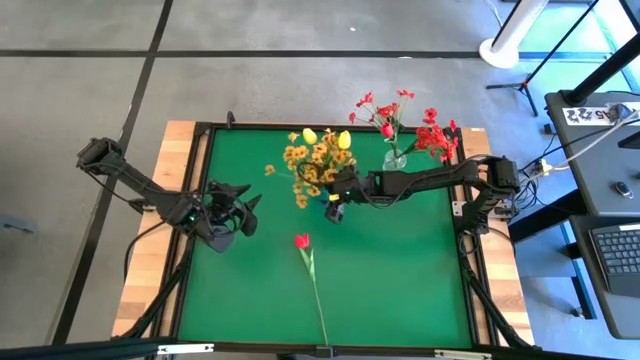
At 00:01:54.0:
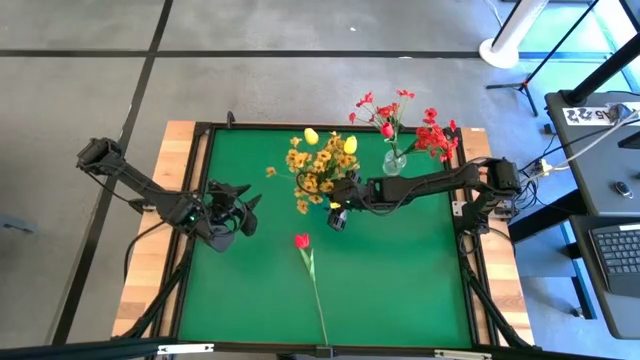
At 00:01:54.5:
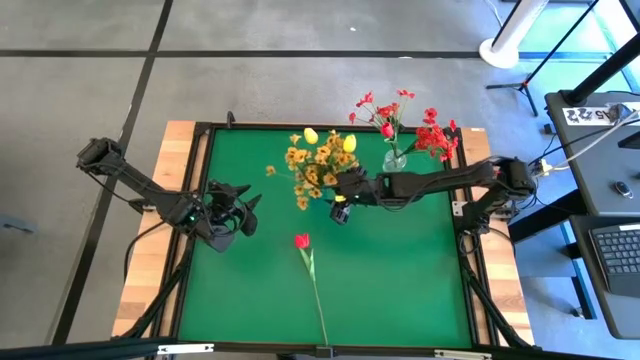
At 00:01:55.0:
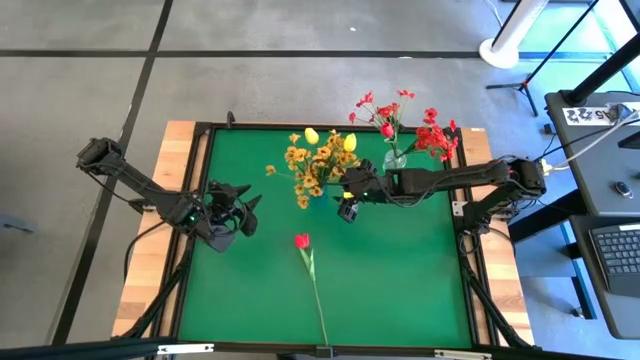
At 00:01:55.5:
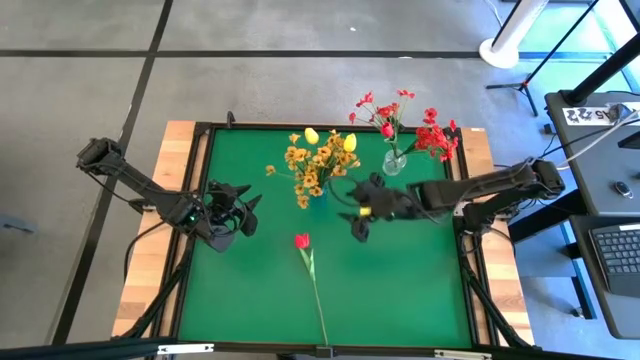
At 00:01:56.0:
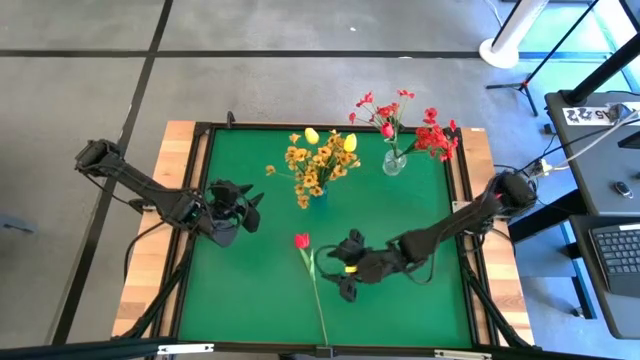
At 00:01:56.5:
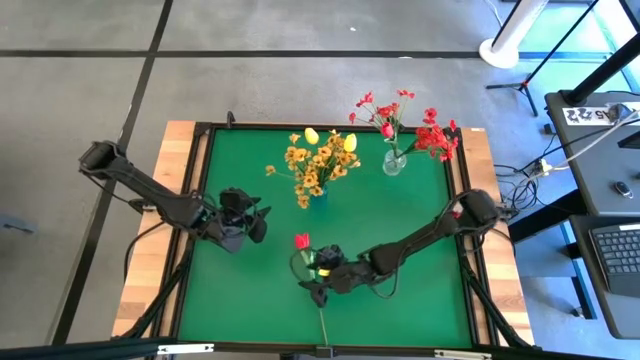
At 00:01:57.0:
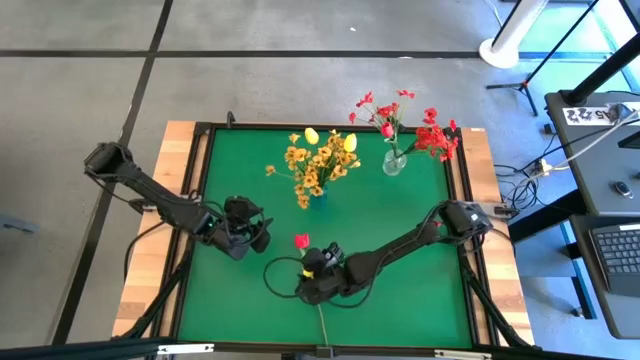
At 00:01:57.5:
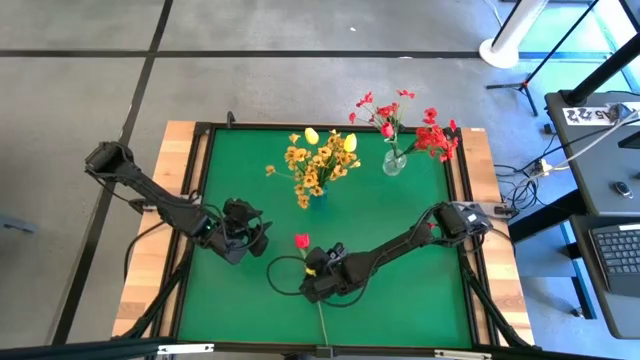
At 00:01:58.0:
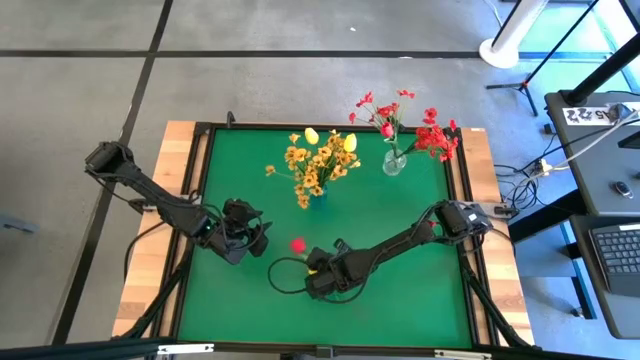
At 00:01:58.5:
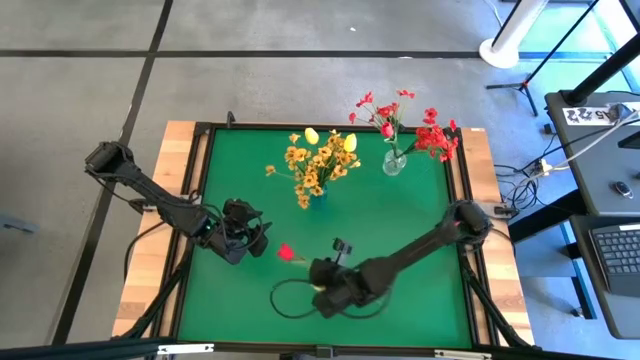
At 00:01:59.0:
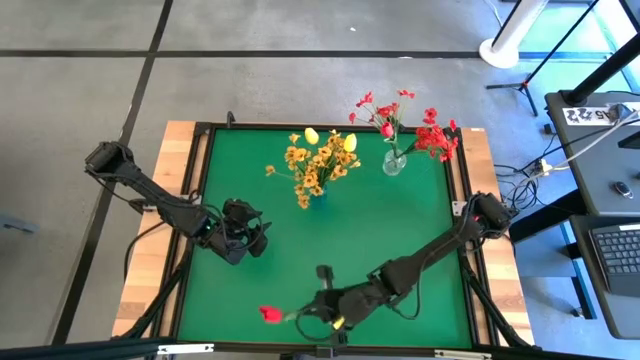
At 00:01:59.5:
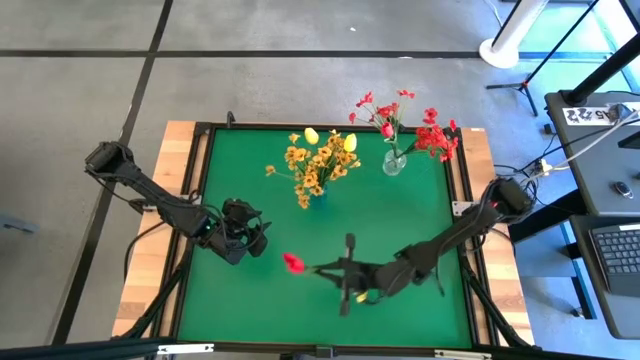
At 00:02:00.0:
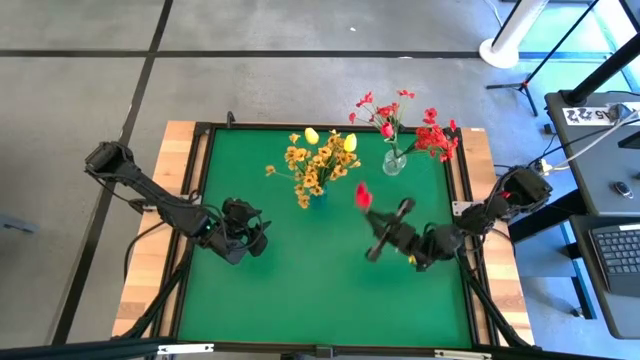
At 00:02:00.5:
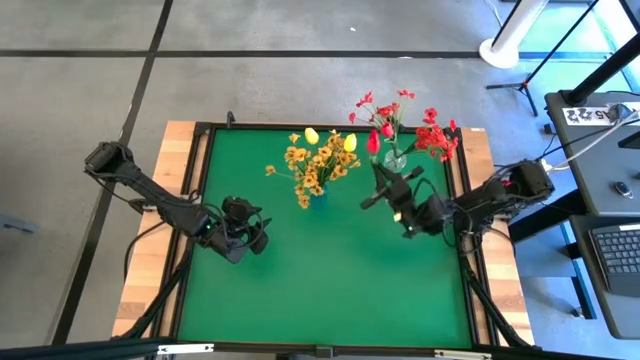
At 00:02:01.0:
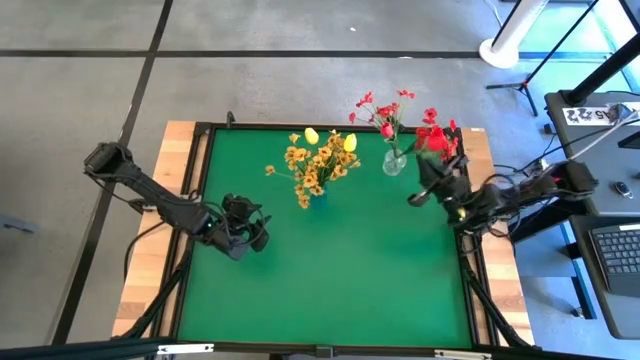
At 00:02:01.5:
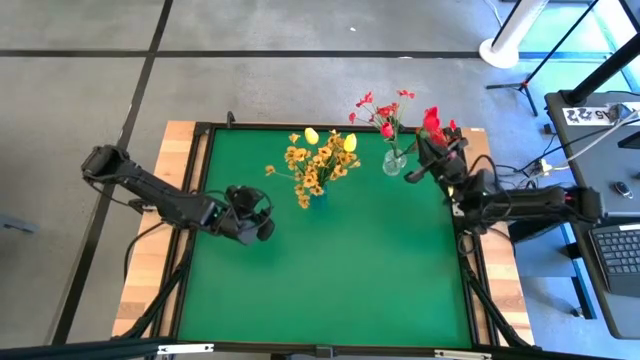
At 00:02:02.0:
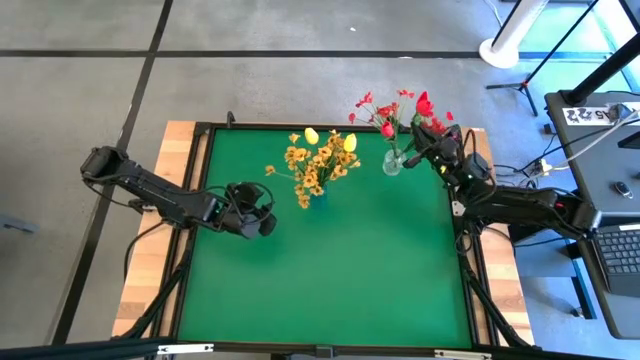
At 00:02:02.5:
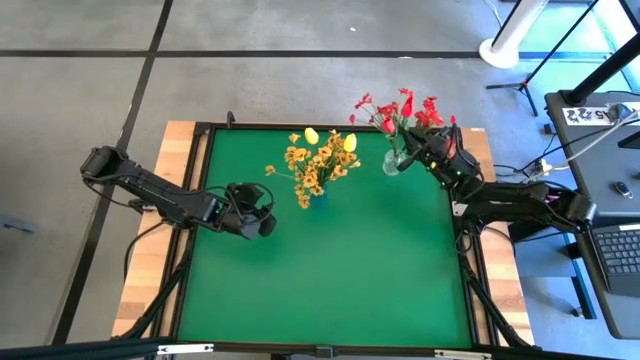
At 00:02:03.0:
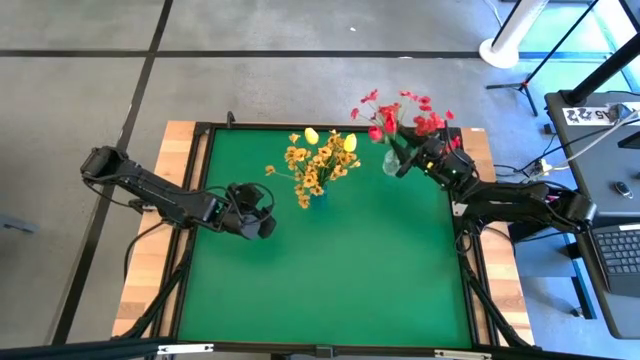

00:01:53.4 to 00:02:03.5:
Task: Sort flowers into vase by color
Put the red flower into the transparent vase

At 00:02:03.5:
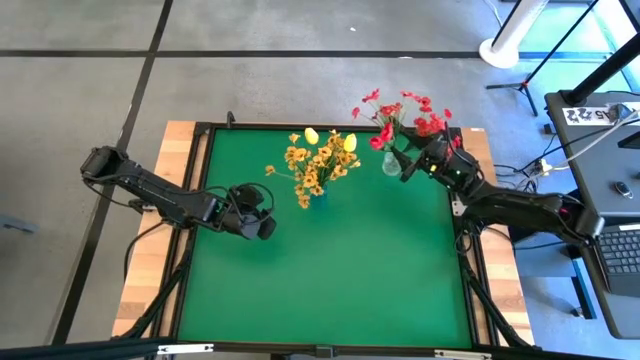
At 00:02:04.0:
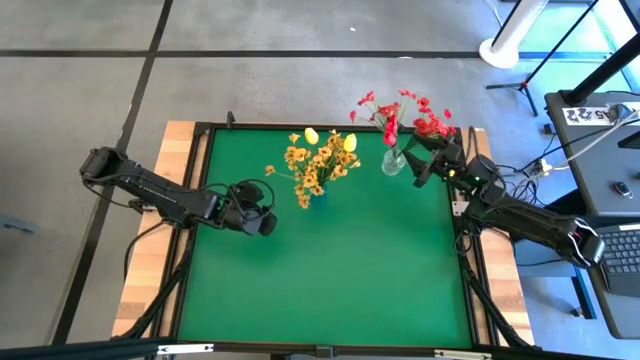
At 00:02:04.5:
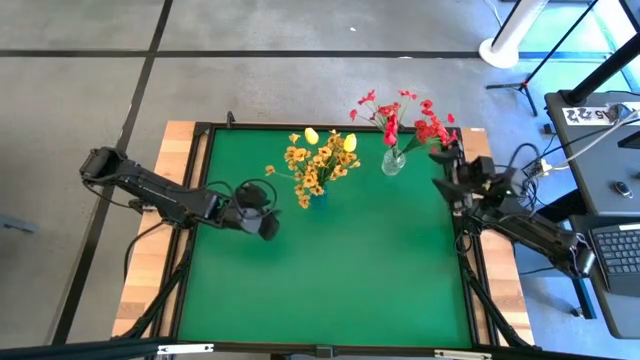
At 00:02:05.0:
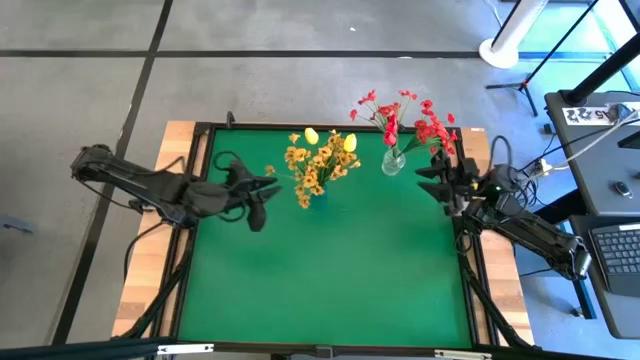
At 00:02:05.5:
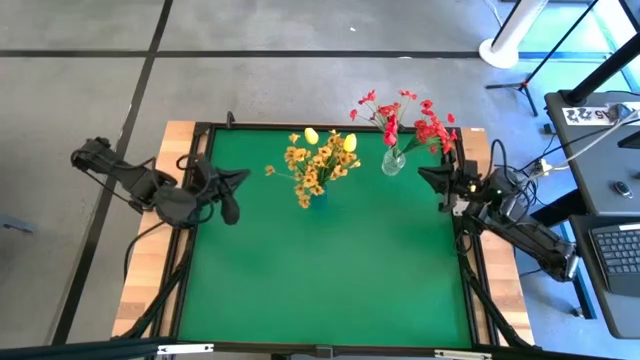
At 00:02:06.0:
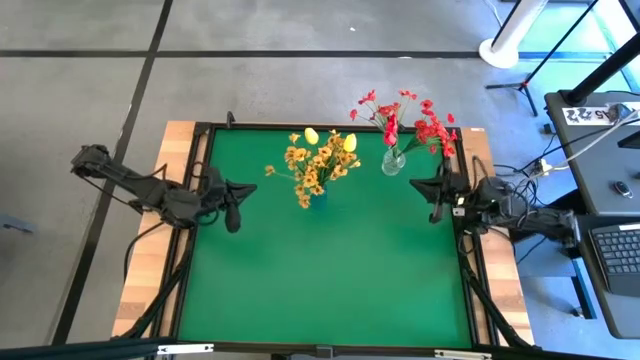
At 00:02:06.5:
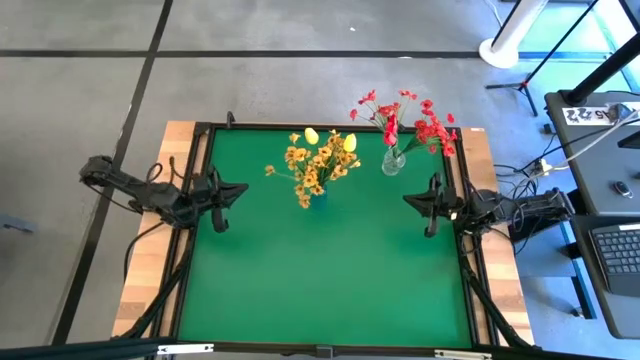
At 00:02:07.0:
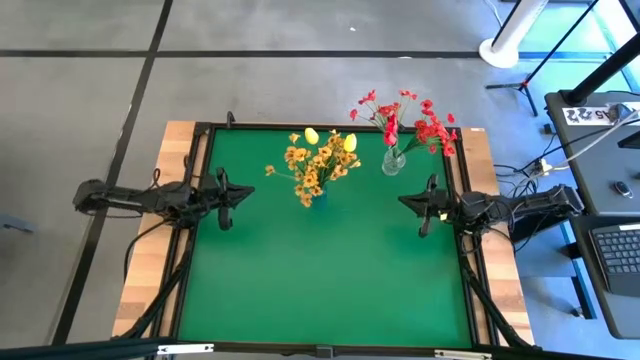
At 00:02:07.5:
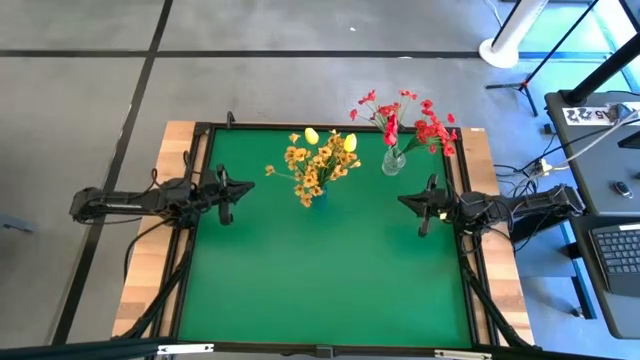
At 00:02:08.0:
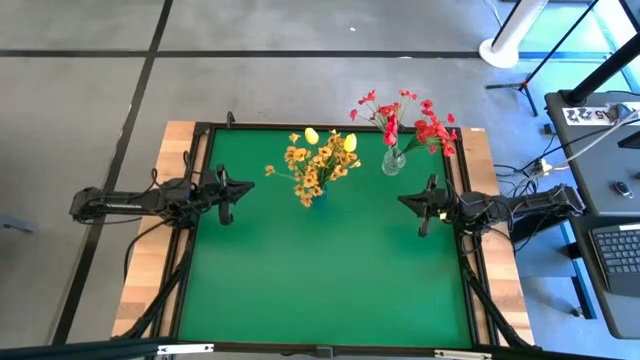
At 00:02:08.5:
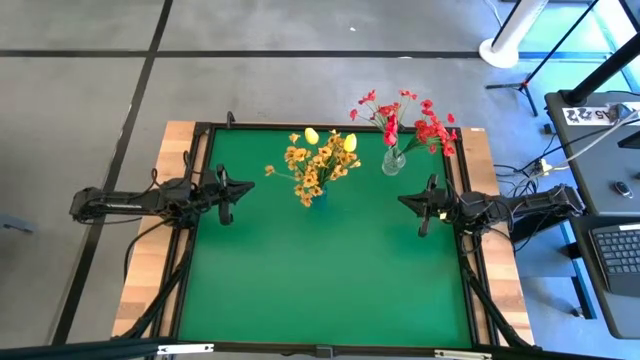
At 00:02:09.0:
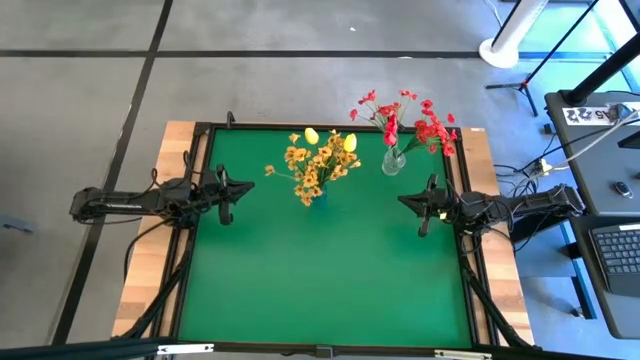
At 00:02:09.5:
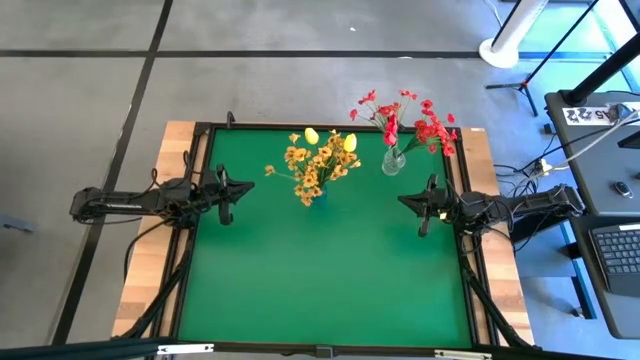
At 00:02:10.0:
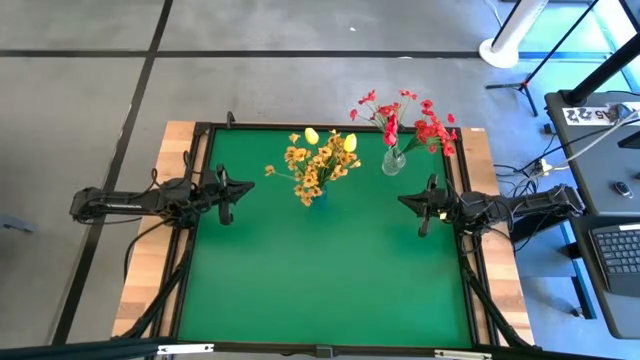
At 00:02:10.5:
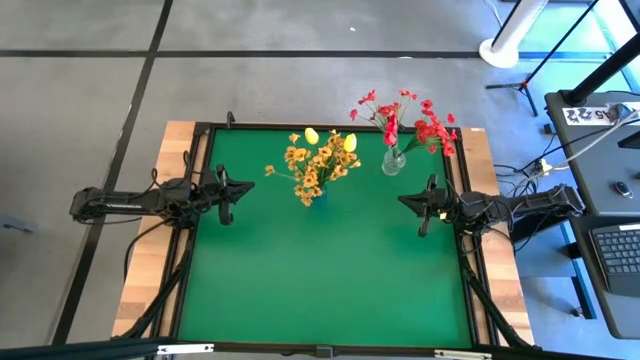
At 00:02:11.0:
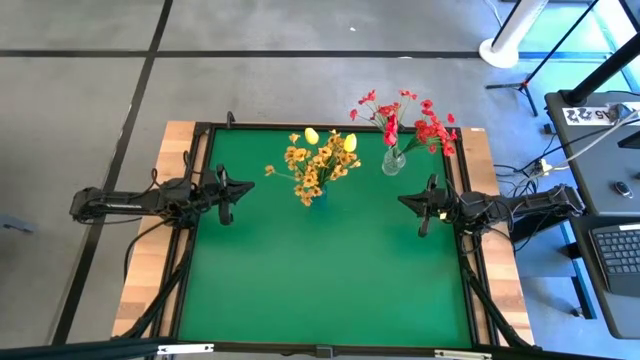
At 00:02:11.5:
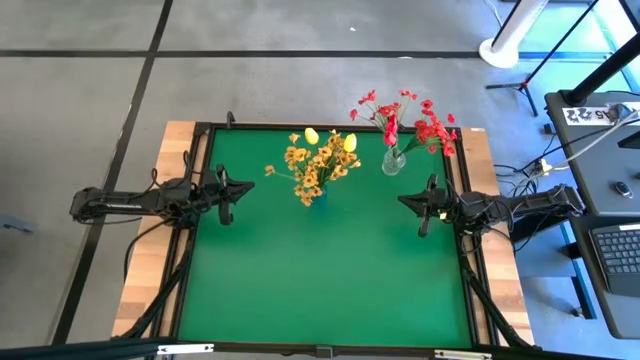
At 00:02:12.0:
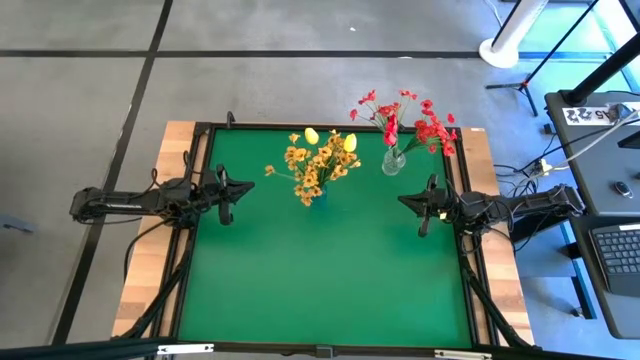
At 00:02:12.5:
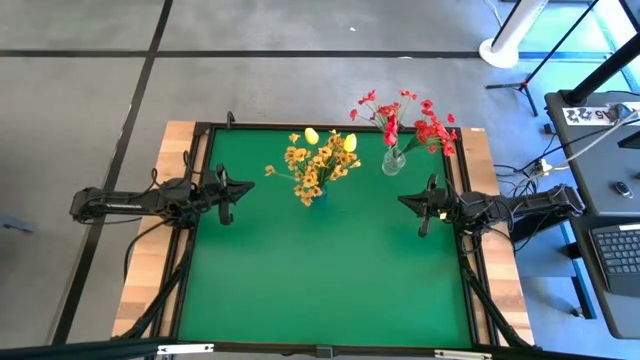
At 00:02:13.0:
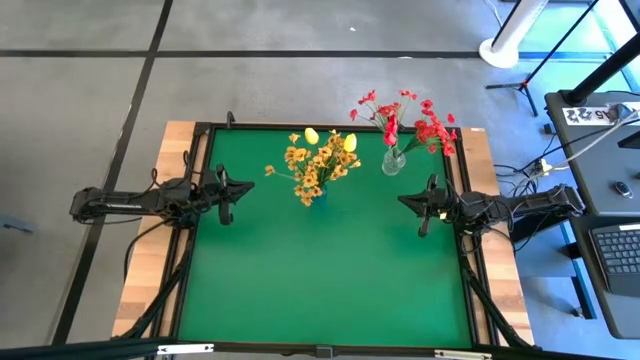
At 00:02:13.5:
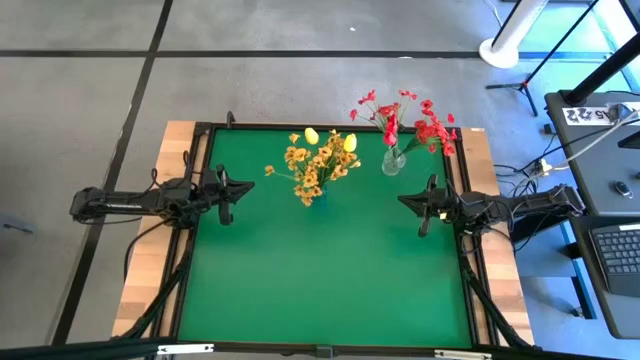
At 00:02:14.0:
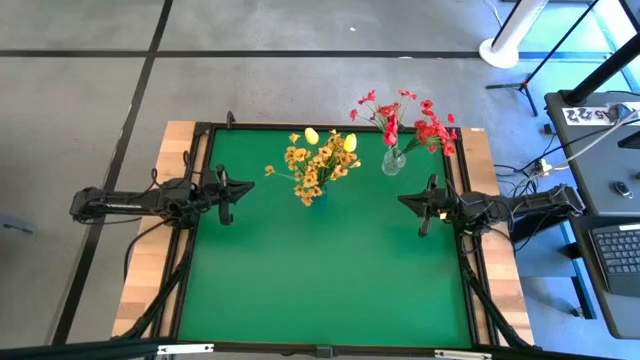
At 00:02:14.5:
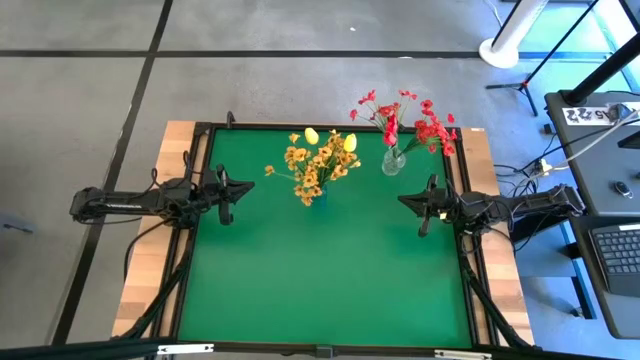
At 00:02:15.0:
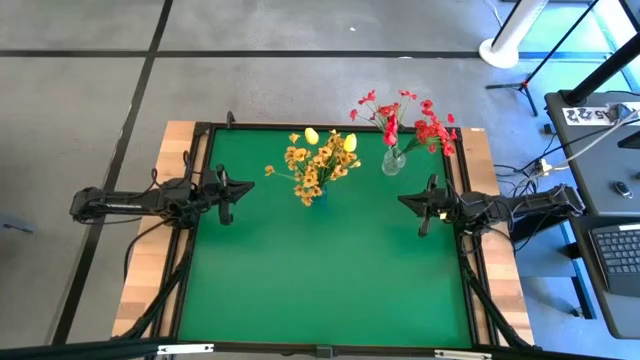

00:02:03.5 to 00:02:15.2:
Return to Home Position
